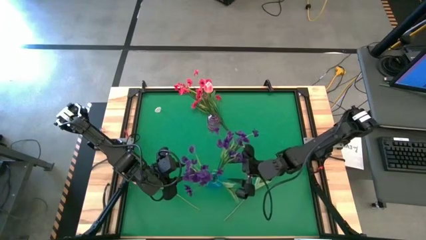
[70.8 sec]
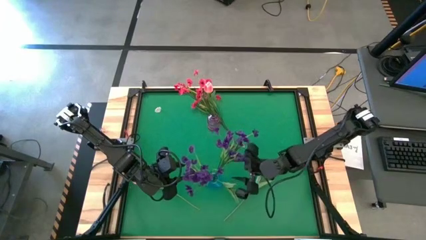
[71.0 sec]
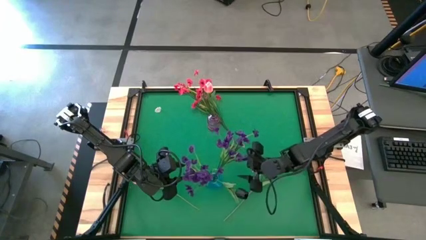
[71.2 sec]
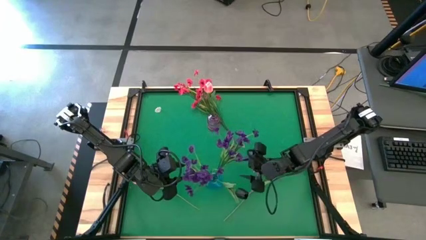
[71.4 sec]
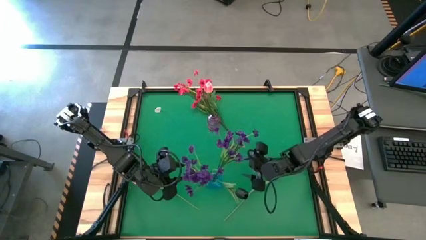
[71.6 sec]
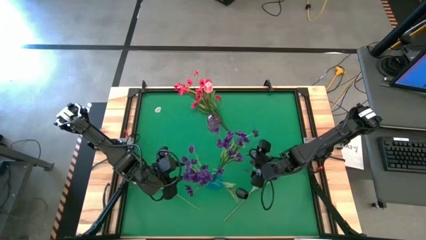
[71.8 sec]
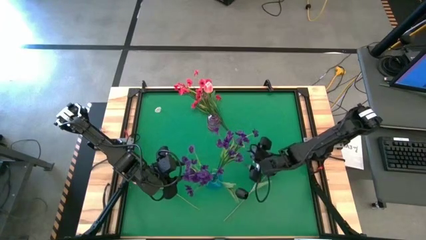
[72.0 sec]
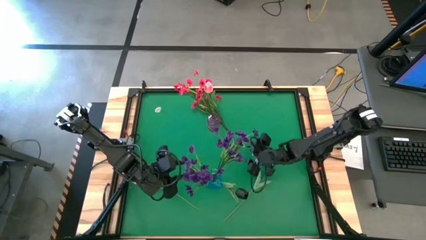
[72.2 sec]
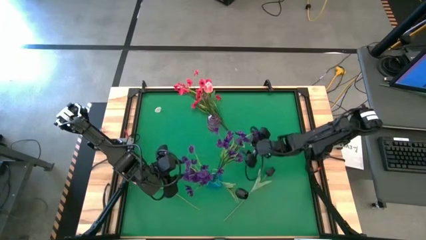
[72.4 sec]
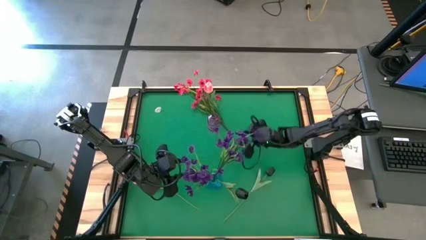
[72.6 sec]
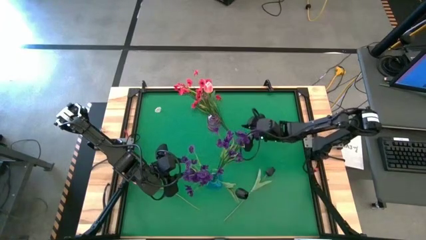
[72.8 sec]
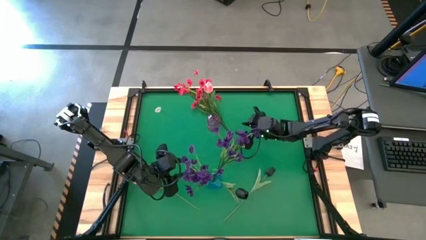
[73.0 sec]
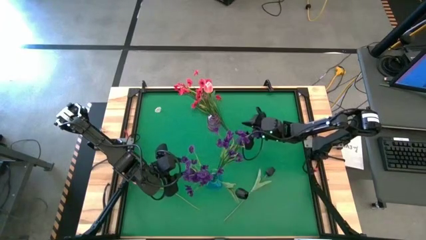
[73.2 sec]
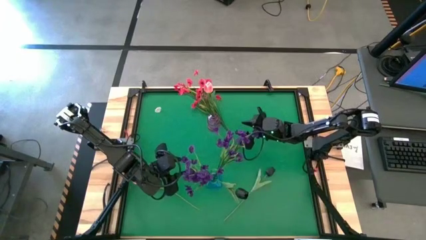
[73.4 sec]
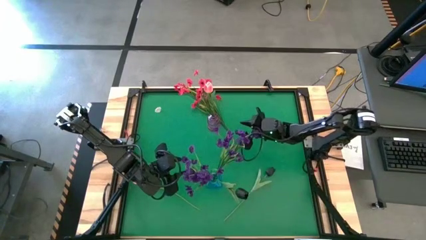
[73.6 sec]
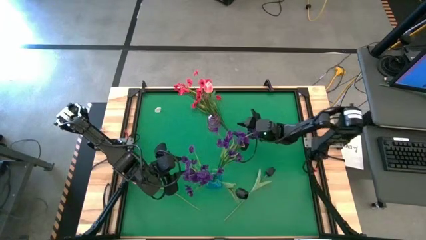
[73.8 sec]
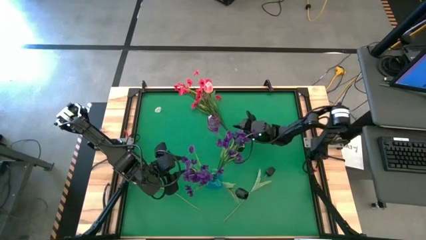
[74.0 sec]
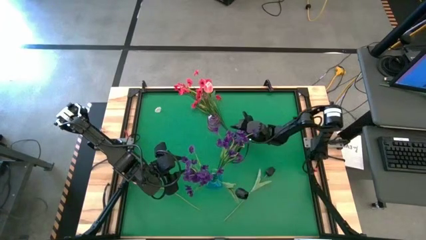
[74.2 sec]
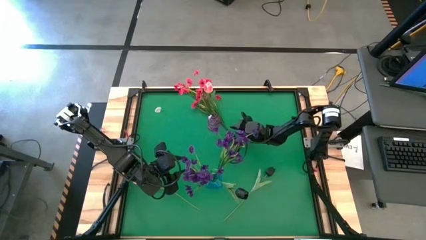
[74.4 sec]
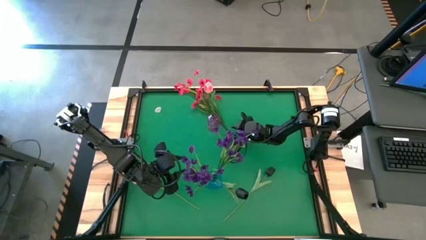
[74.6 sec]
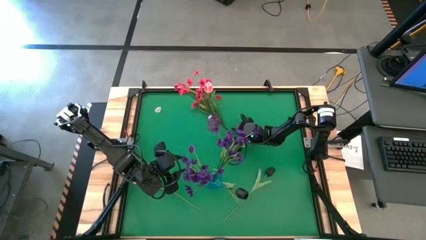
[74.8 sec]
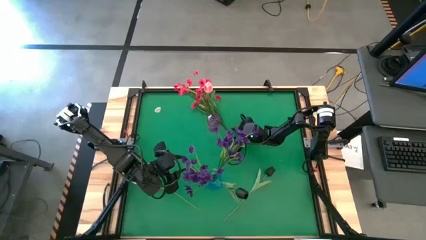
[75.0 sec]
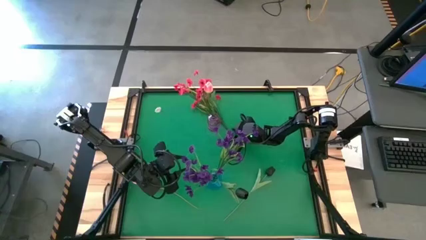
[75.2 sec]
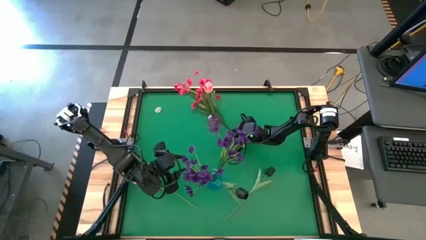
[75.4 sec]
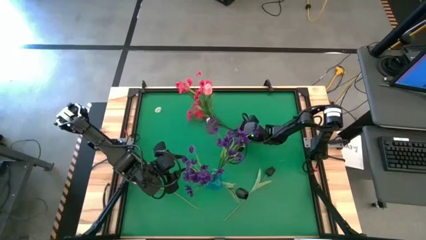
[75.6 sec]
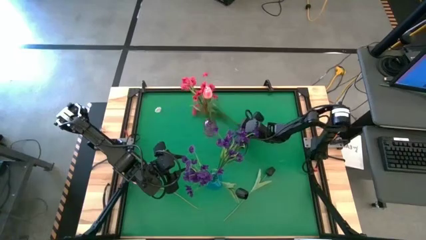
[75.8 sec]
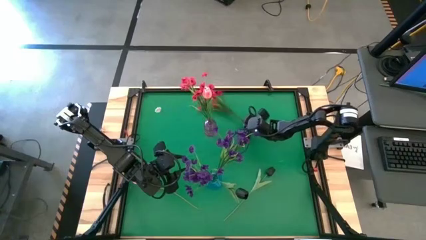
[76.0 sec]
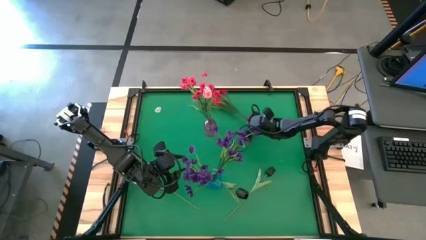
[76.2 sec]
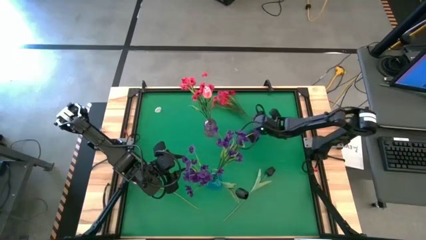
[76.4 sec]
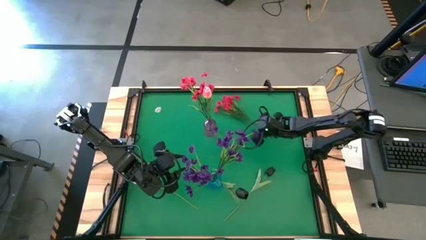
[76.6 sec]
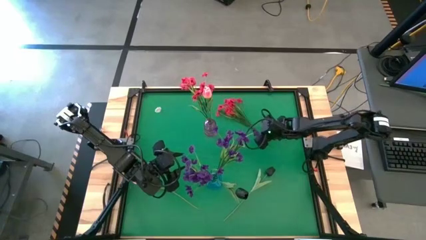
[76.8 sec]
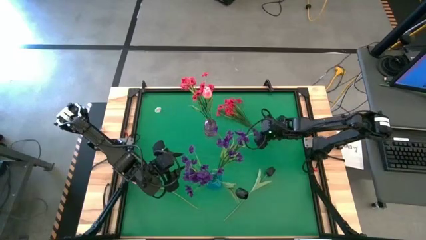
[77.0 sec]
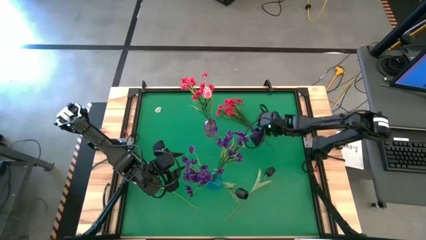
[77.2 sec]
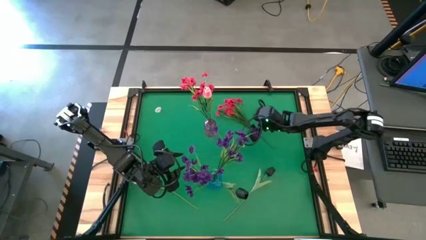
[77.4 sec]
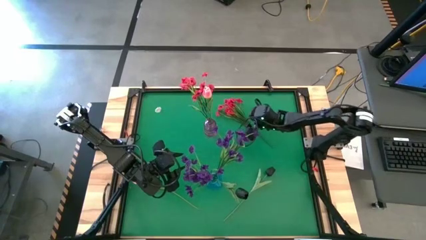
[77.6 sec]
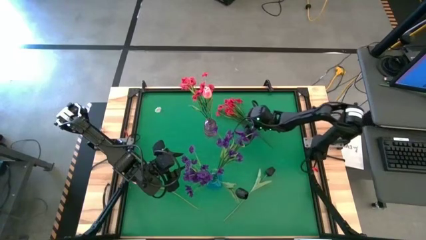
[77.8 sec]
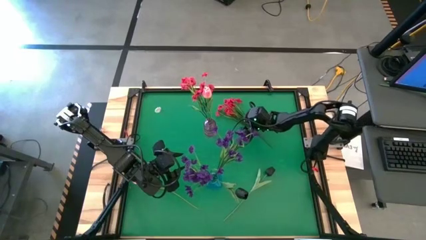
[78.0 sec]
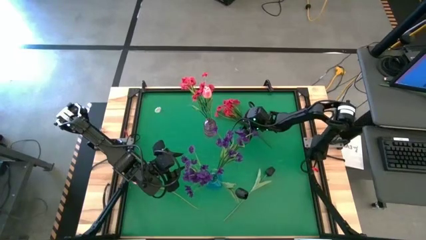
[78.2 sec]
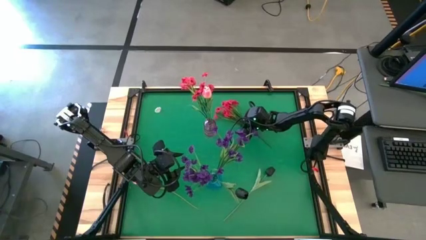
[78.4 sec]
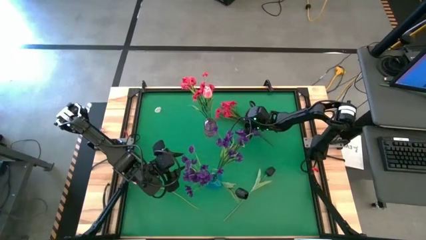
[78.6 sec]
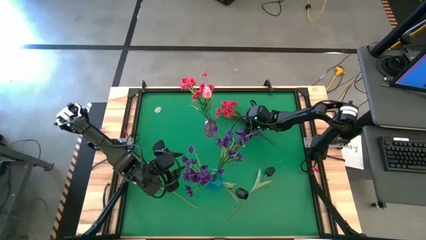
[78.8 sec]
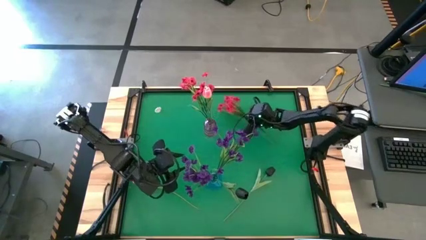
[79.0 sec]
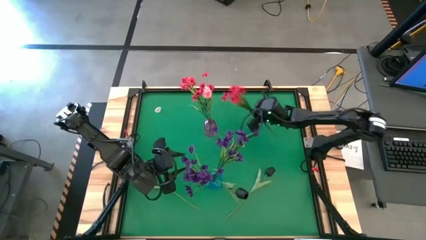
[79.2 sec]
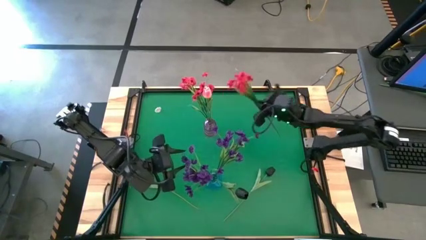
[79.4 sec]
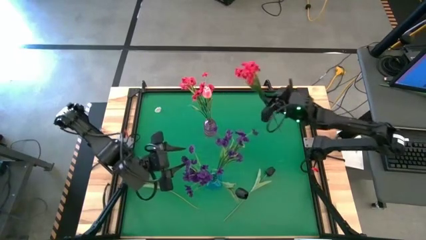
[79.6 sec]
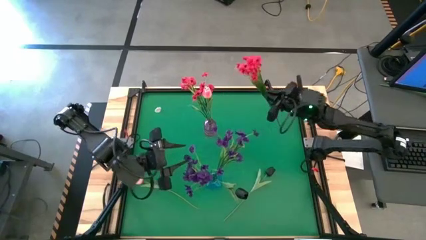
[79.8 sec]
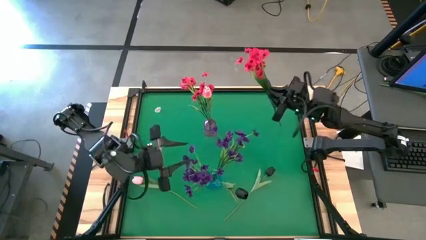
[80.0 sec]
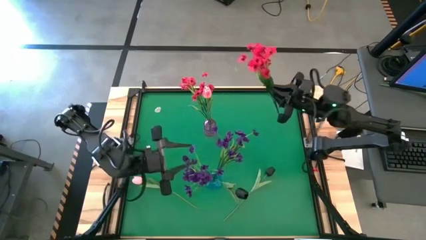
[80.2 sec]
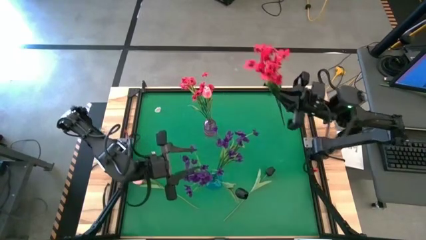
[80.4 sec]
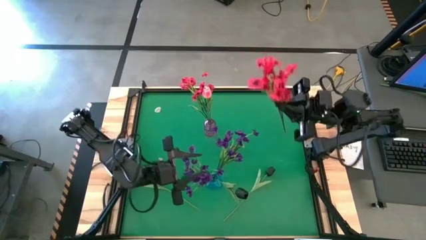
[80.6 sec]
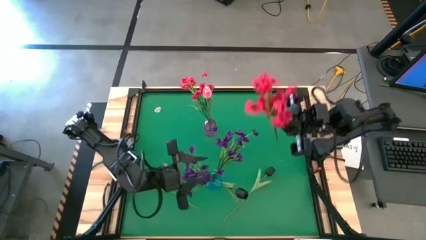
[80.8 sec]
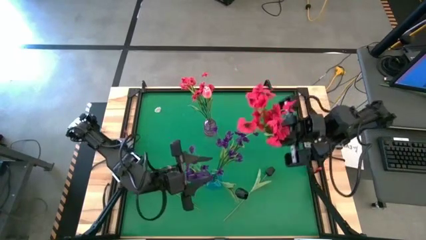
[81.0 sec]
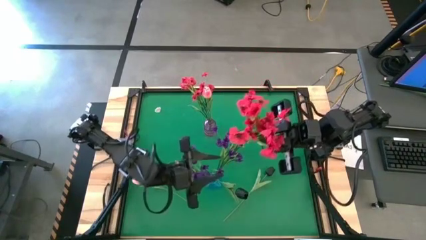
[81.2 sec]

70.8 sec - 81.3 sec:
Task: Sort flowers into vase by color
Put the red flowers into the purple vase
